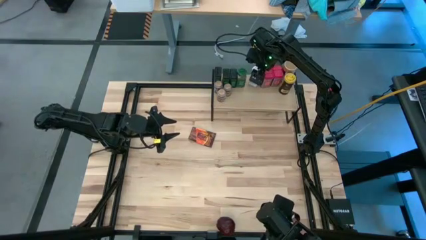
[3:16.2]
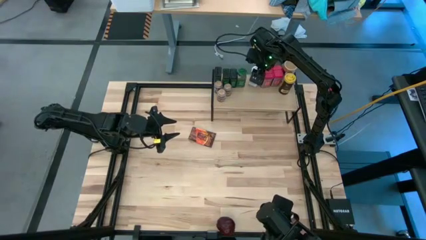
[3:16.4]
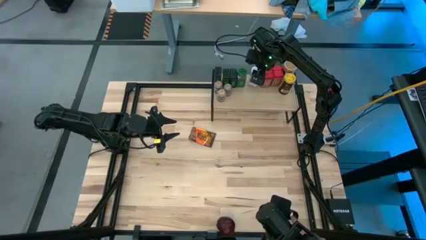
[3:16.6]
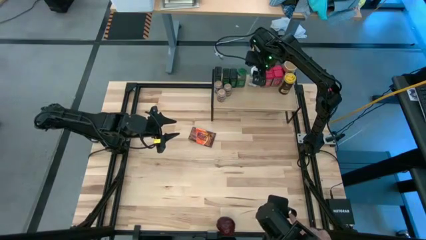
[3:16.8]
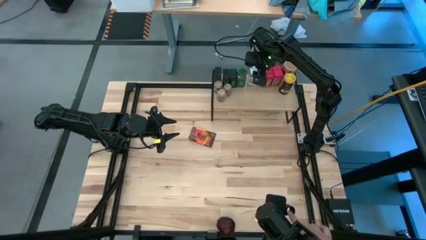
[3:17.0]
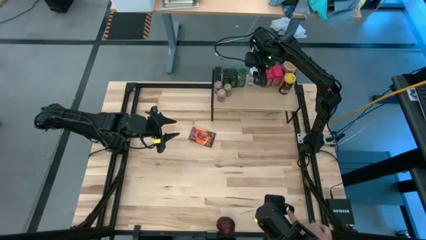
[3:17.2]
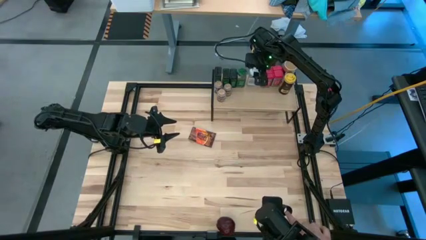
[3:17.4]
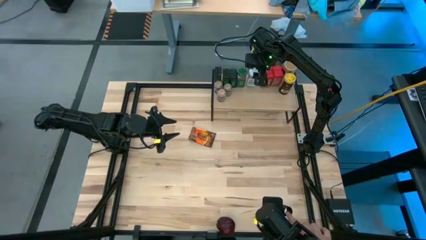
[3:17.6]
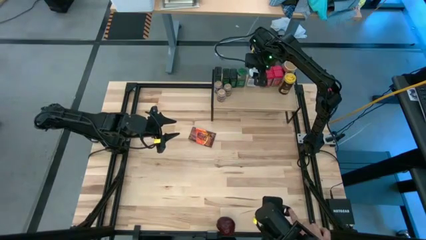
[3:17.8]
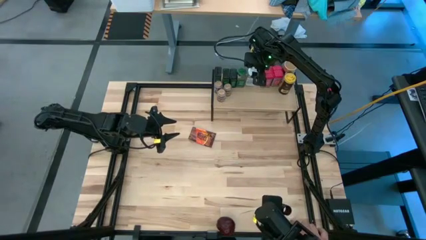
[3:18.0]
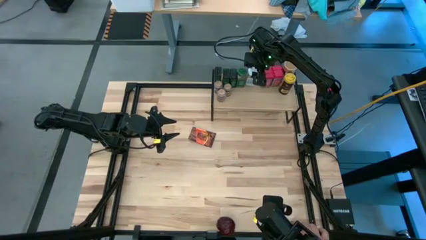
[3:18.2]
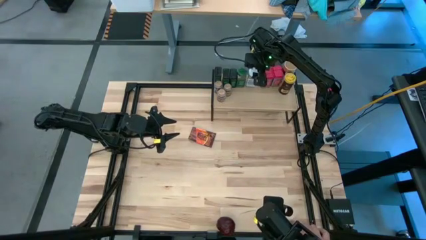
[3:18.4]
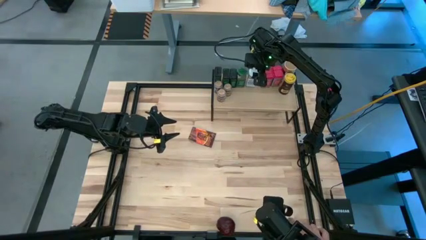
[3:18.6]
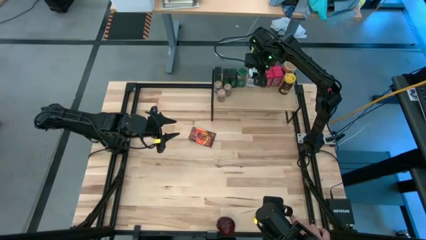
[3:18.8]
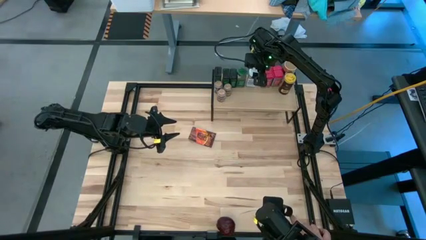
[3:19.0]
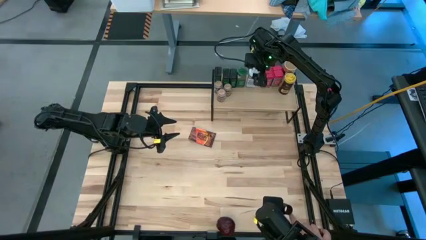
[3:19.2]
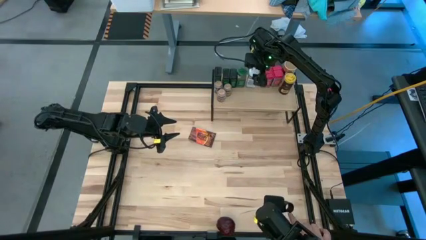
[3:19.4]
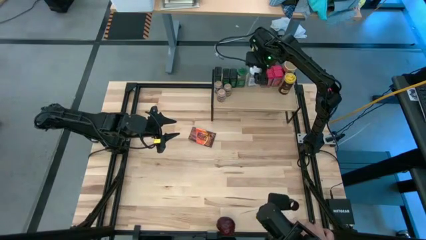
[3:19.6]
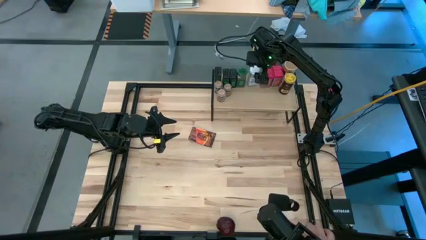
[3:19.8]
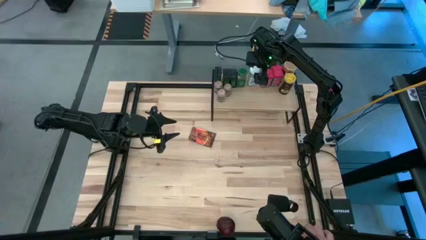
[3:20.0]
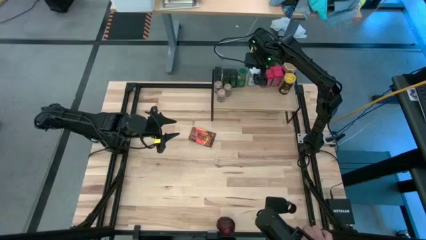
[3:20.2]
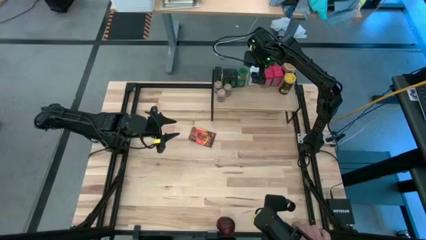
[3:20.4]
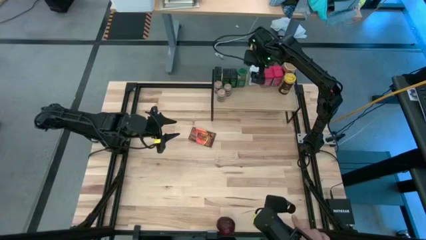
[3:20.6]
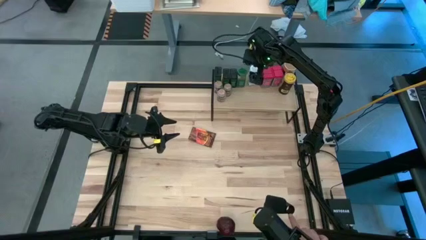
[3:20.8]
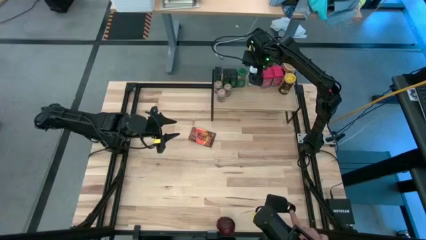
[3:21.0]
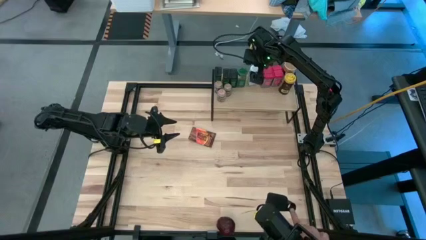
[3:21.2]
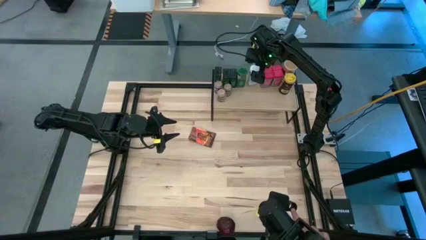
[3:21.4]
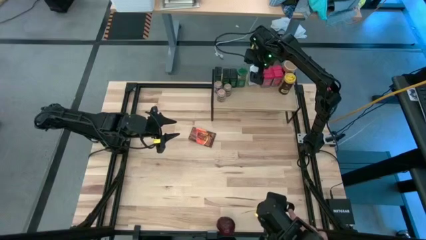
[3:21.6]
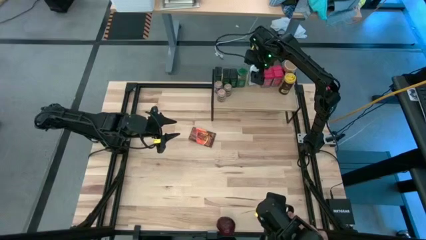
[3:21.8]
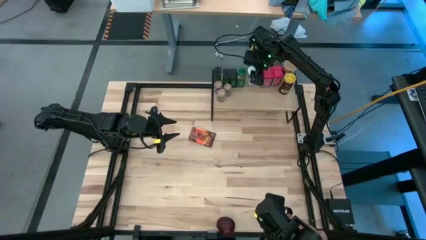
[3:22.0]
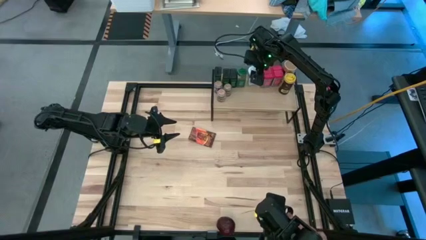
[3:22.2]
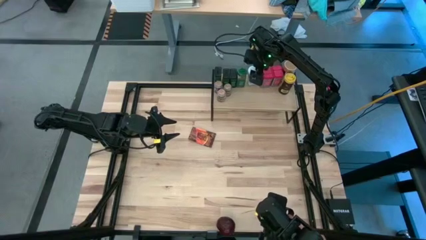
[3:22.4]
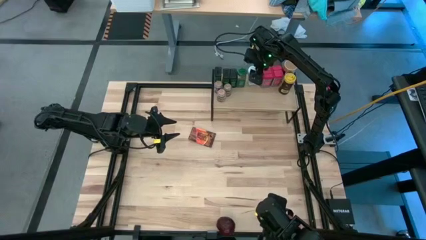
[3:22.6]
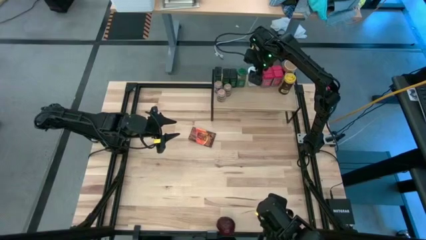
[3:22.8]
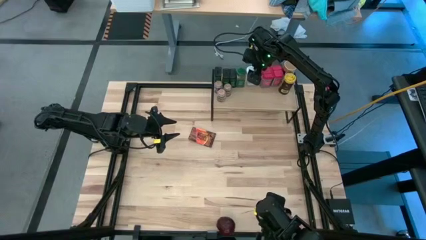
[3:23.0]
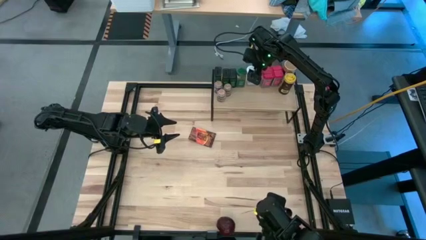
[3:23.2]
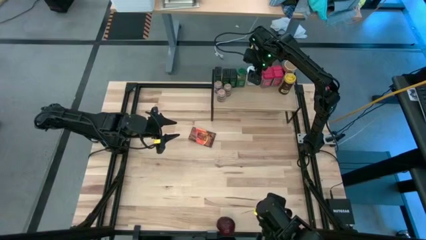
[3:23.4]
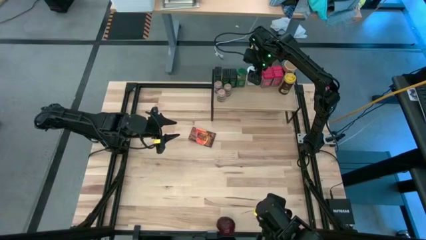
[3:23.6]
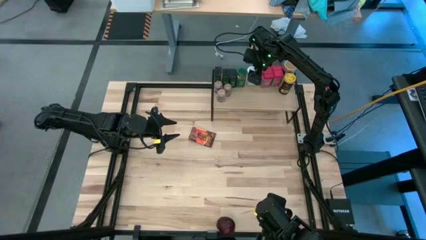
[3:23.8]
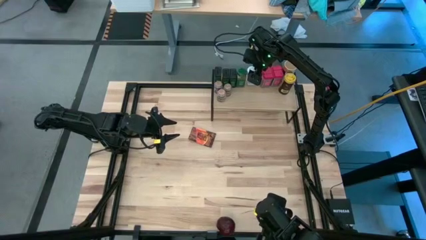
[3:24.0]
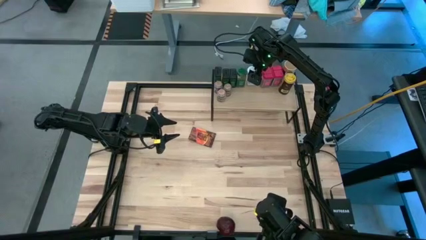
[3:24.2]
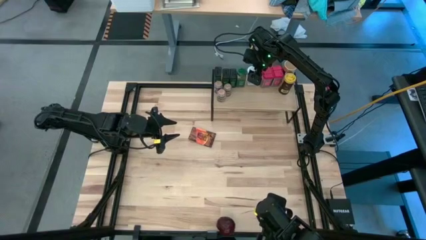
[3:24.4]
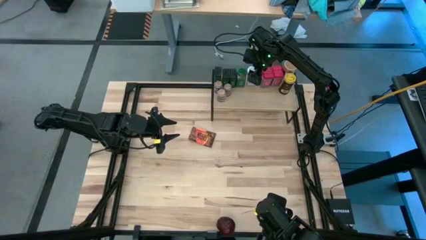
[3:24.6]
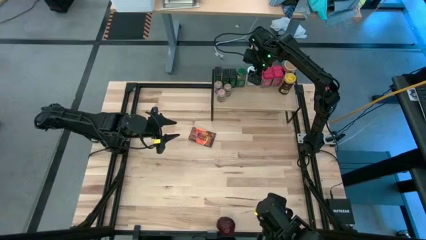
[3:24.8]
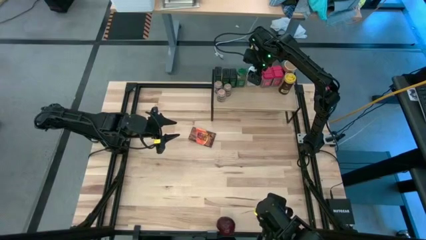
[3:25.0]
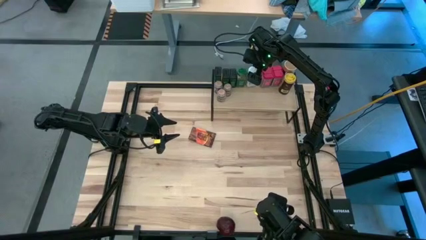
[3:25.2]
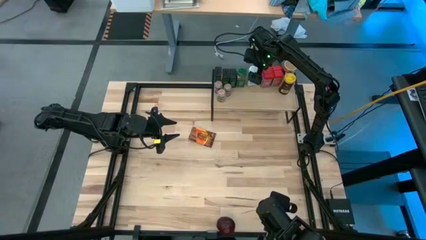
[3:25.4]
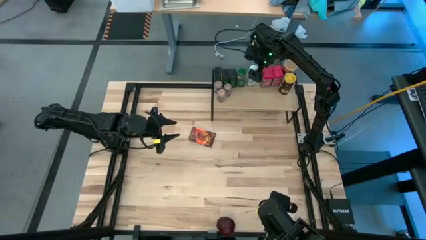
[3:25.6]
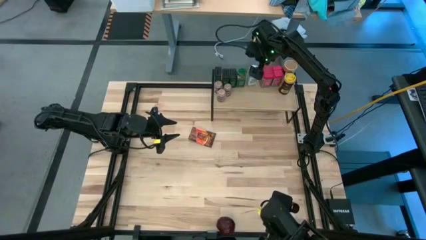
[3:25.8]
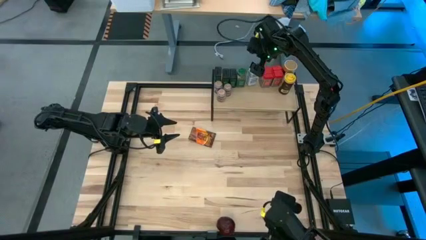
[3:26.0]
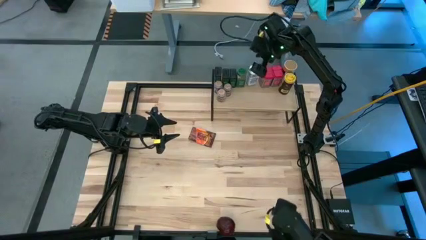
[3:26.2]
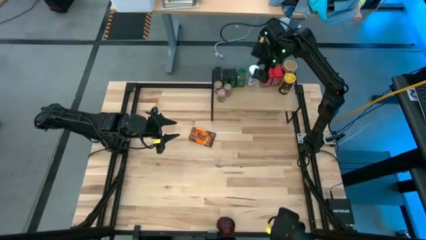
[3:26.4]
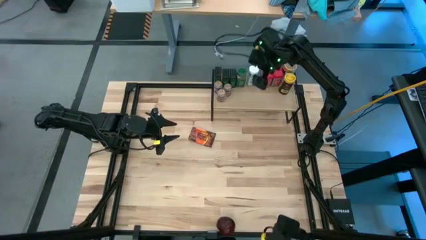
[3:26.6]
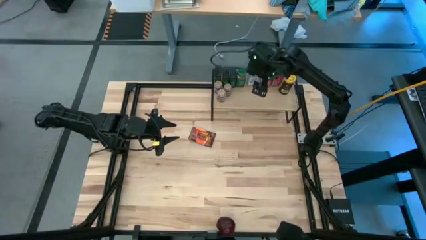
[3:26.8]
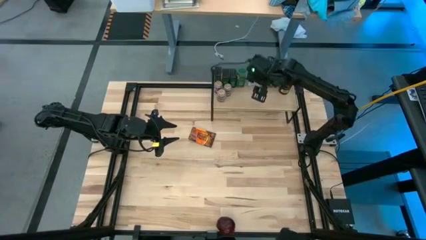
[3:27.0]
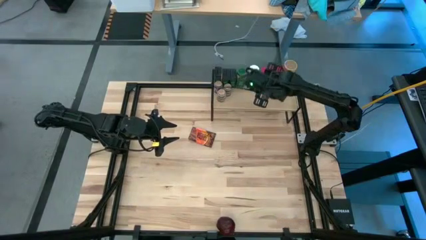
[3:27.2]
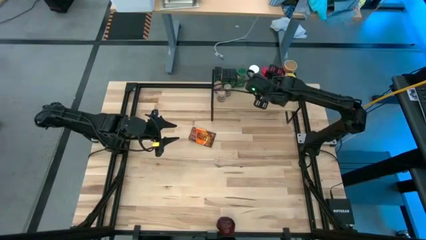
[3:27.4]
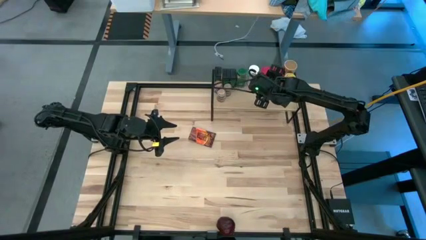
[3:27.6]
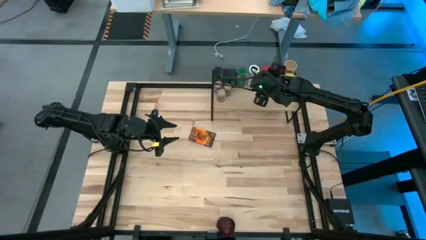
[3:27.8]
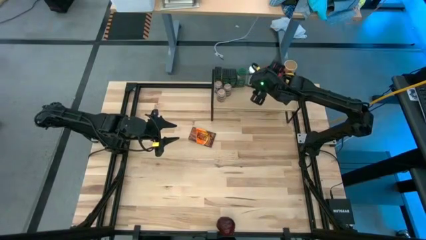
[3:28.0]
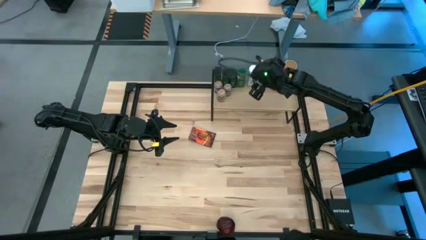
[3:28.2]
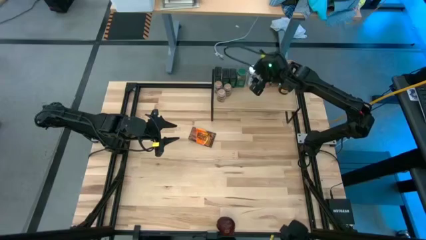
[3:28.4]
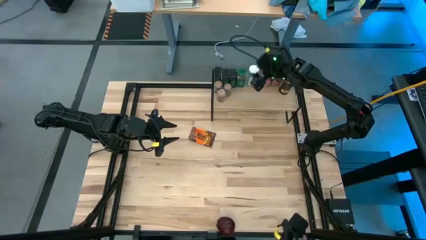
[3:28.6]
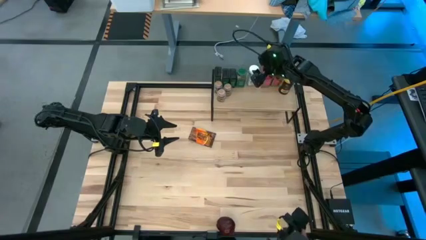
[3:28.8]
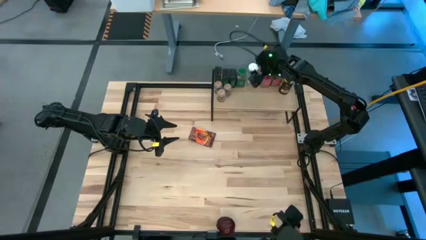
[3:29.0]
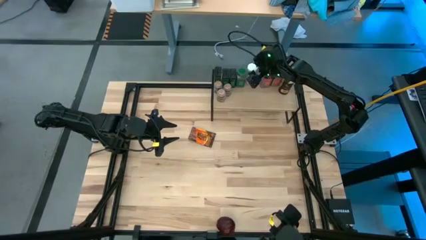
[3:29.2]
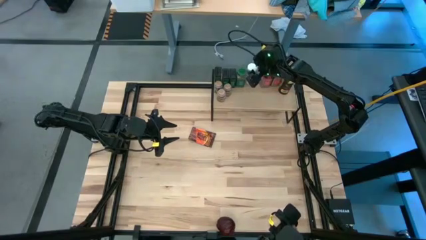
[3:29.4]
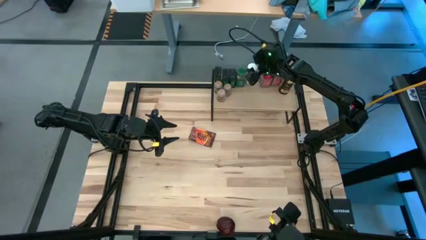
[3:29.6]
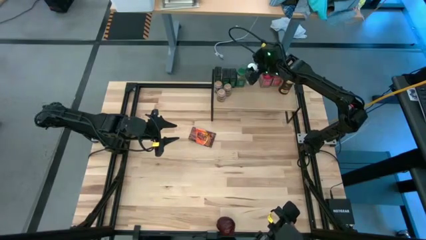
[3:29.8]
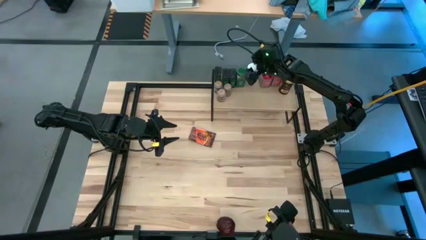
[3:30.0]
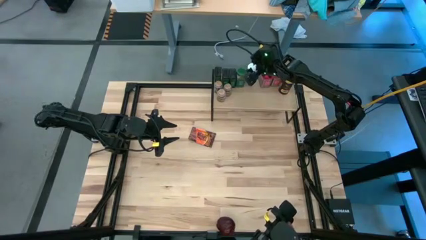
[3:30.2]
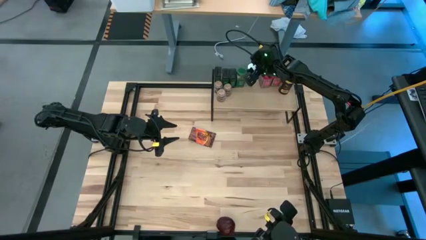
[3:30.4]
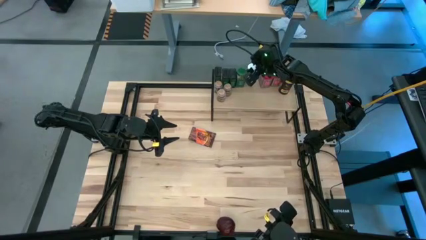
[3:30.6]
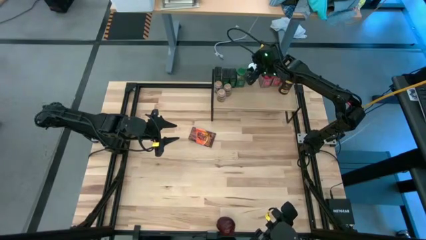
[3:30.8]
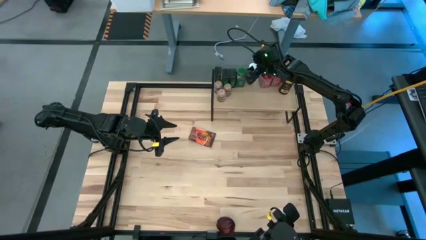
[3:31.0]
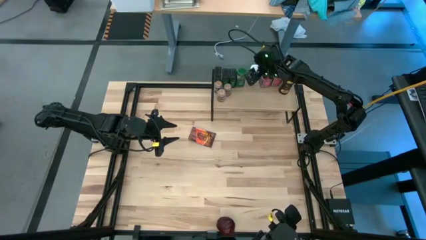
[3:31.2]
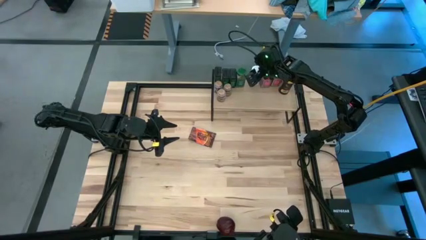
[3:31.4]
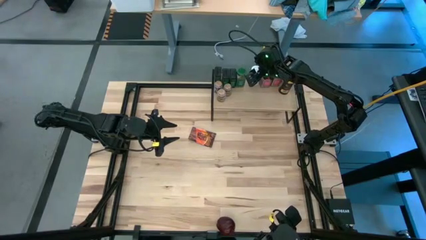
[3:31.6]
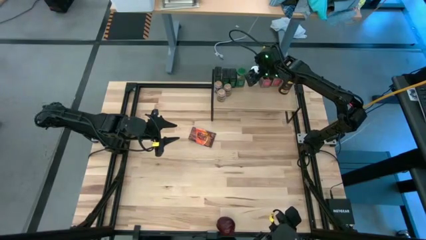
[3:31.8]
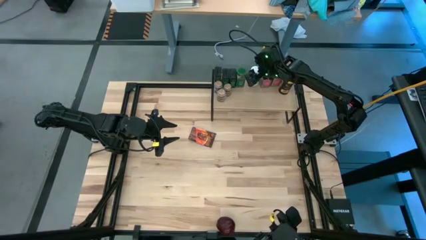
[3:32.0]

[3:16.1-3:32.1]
Task: Shelf spices
Put the white seasoning can on the shelf
